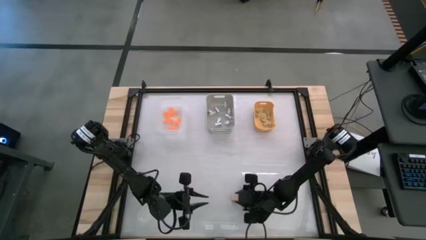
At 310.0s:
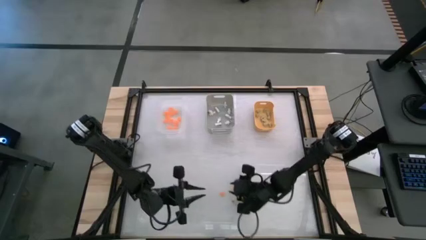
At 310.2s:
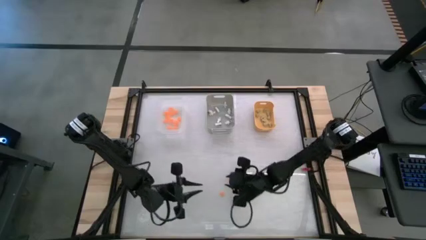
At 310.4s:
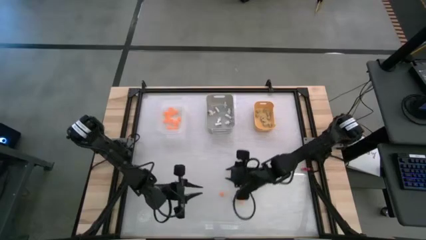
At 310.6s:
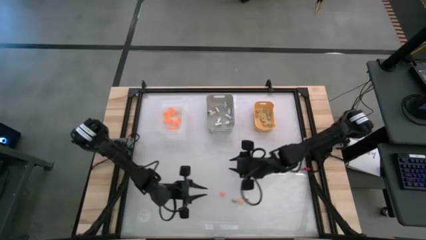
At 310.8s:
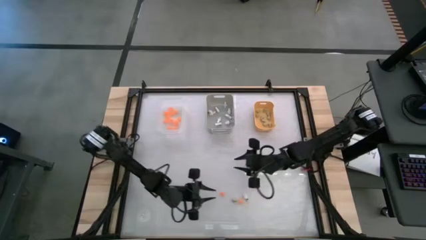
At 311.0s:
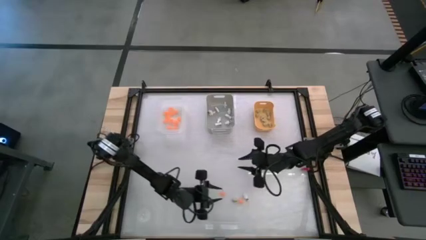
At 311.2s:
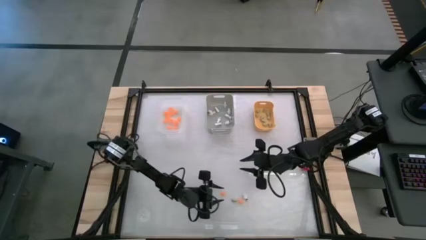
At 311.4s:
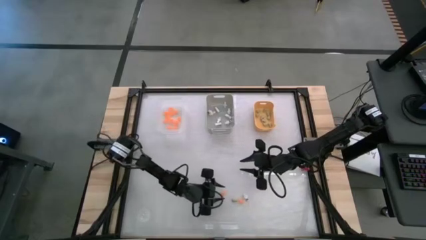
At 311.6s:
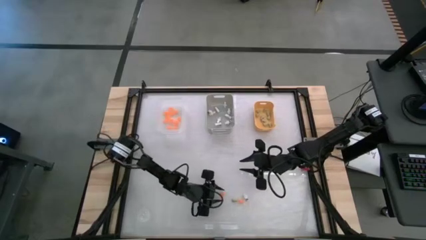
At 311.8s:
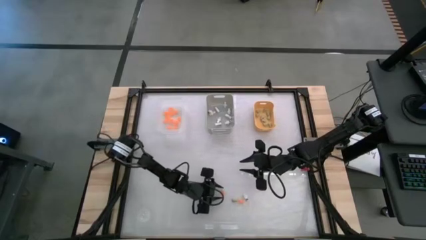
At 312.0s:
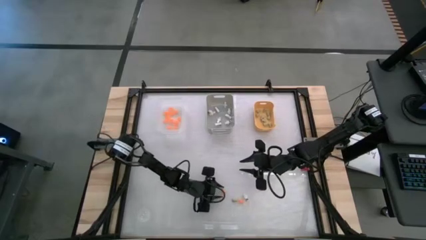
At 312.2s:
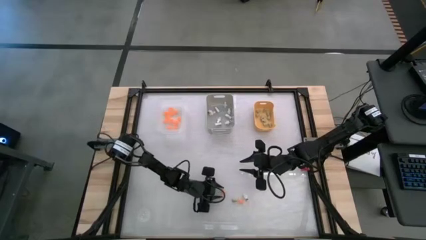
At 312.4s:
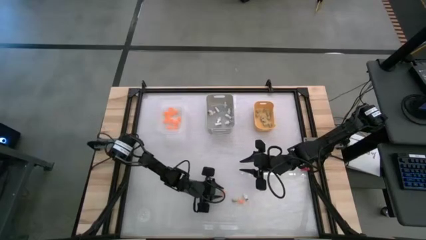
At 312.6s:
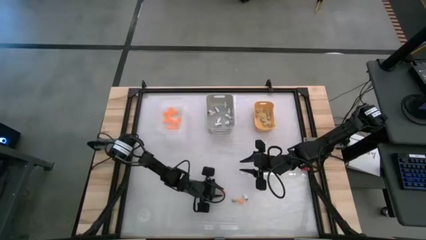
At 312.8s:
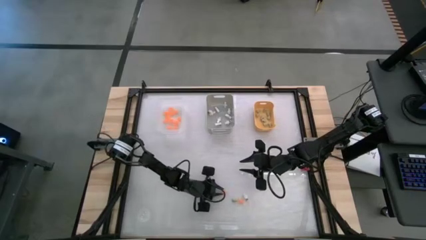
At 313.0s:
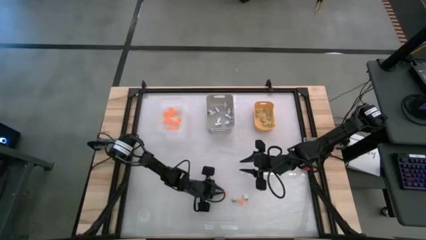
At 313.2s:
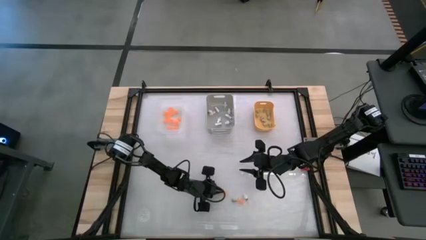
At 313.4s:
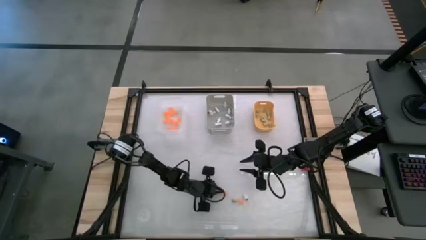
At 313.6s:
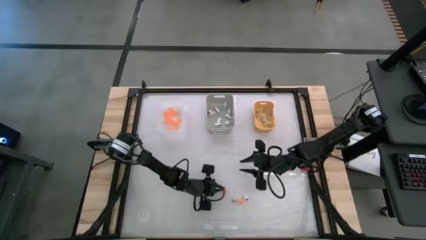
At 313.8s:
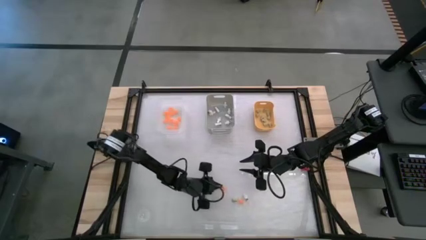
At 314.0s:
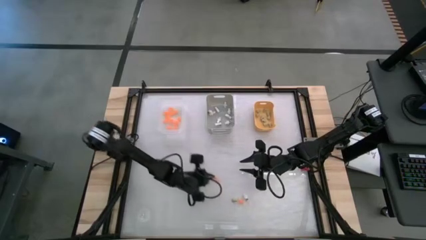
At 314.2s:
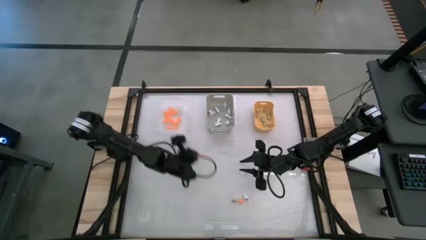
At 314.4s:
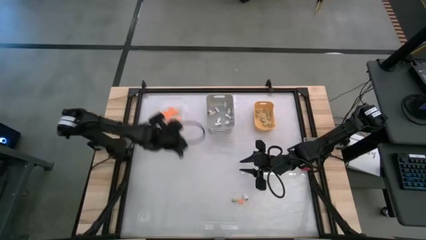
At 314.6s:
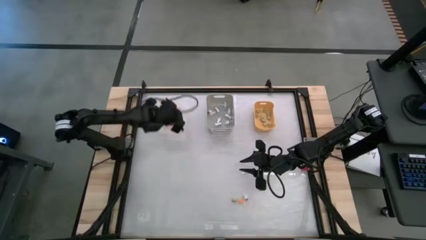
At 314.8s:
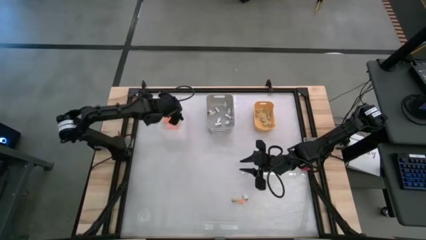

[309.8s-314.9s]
Task: Sort Halloween decoration
Put the orange spider toy into the transparent white bin

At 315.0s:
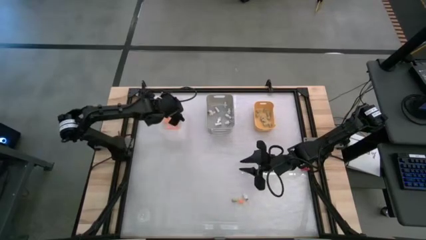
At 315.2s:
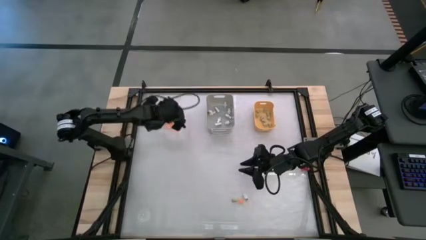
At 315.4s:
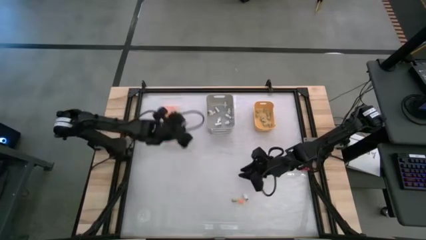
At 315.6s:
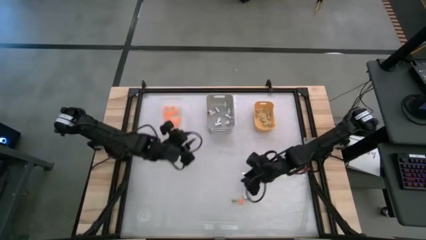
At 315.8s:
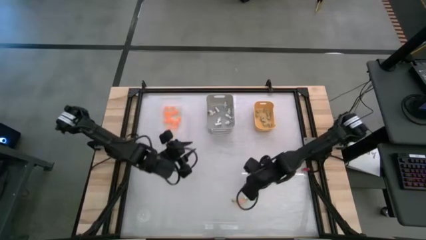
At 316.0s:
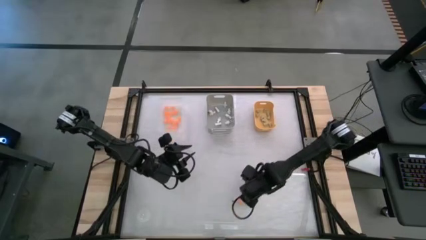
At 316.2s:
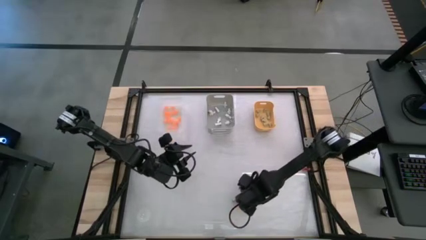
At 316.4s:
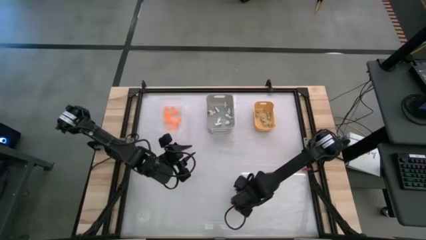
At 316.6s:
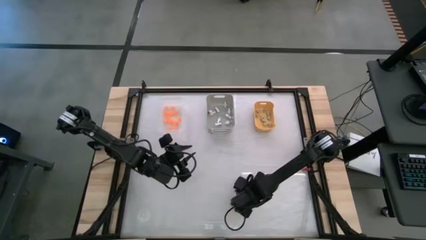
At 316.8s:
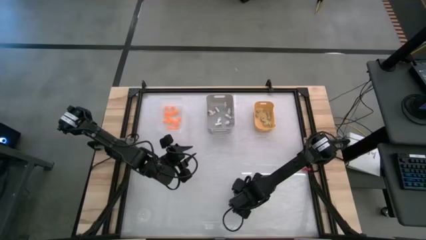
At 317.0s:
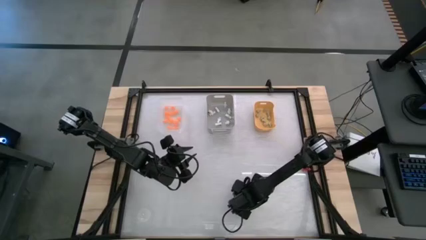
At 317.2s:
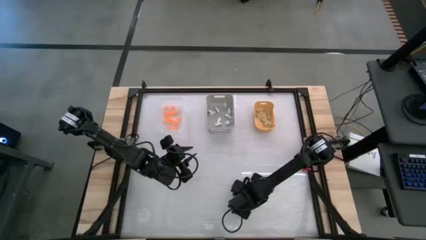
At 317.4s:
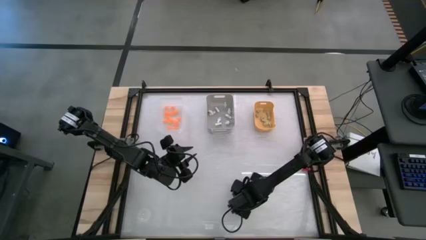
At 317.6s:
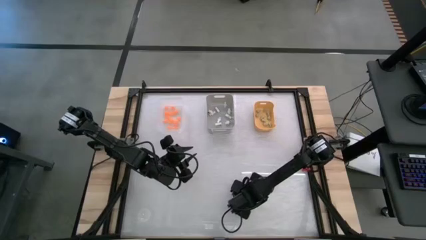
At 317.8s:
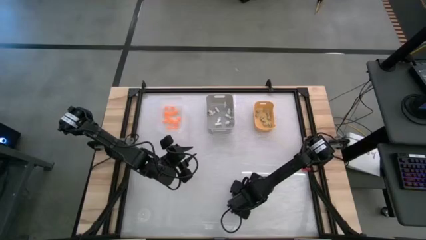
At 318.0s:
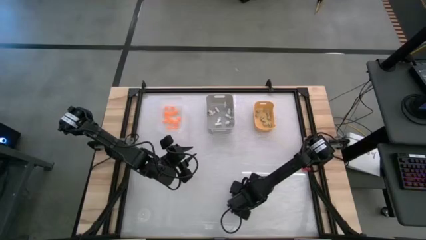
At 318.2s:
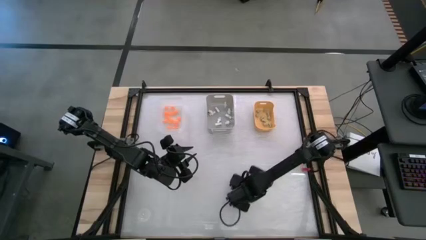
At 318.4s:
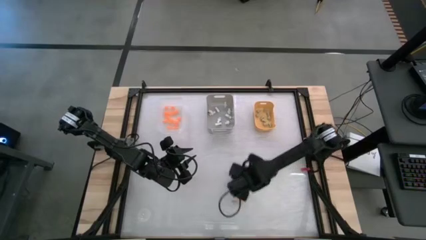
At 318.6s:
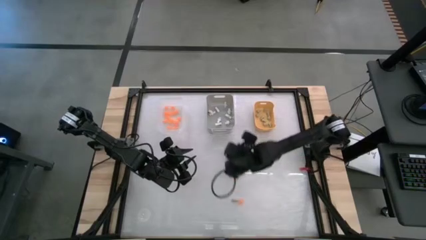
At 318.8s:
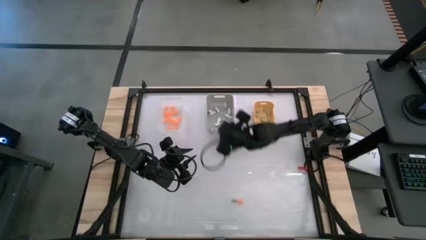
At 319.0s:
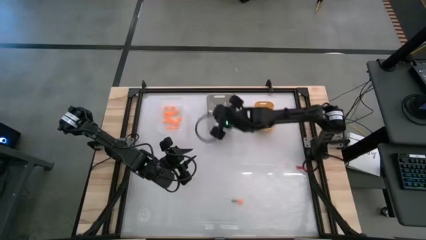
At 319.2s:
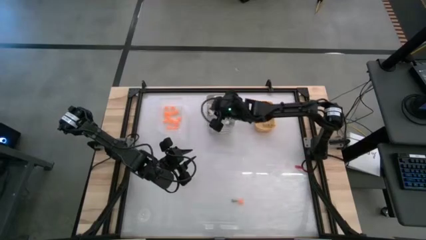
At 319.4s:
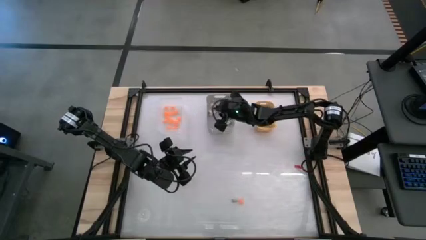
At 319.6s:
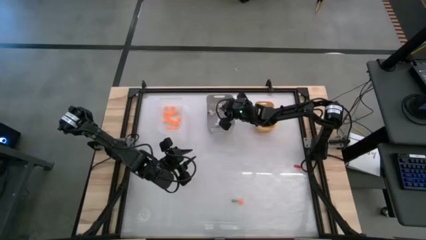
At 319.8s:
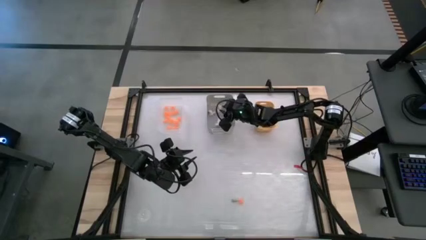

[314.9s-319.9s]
Put the white skeleton toy into the gray bin

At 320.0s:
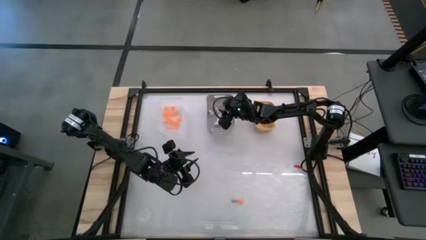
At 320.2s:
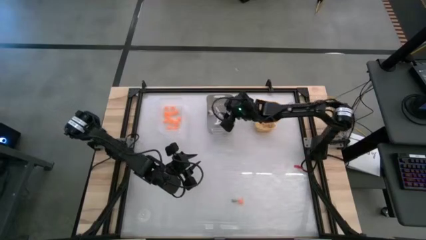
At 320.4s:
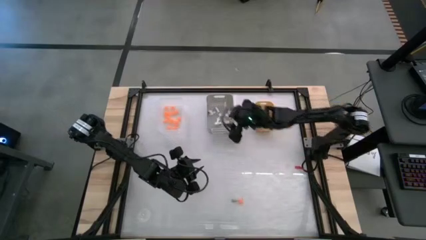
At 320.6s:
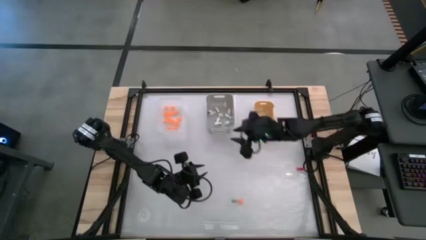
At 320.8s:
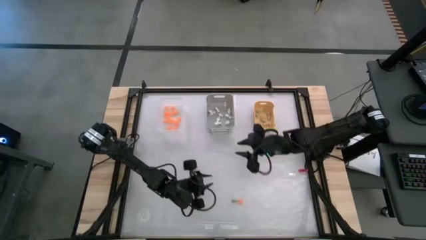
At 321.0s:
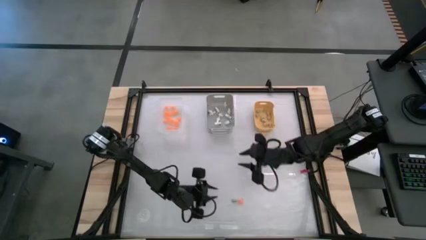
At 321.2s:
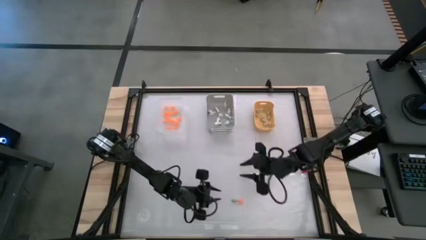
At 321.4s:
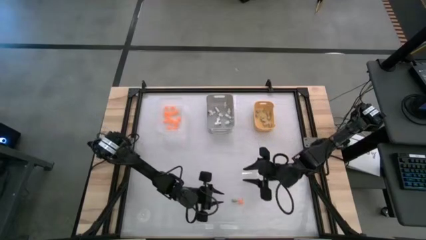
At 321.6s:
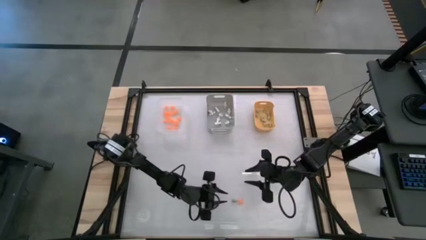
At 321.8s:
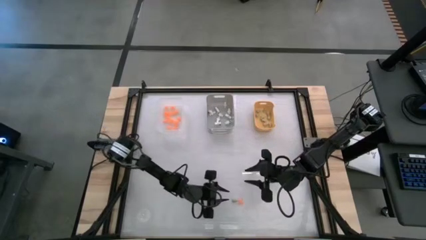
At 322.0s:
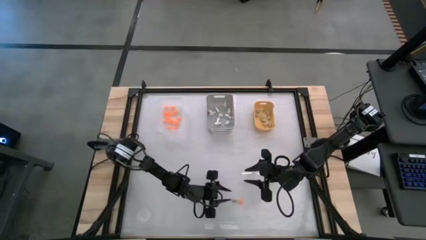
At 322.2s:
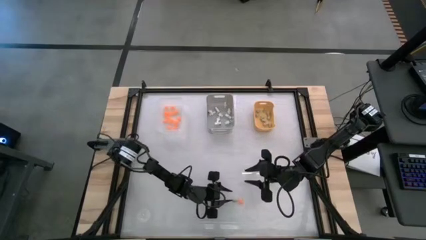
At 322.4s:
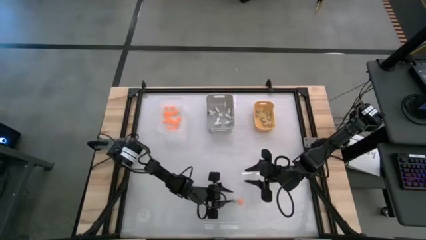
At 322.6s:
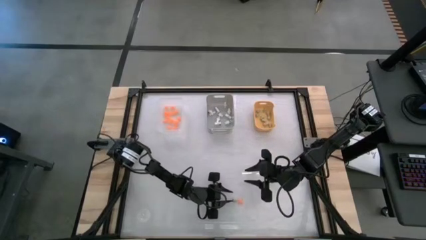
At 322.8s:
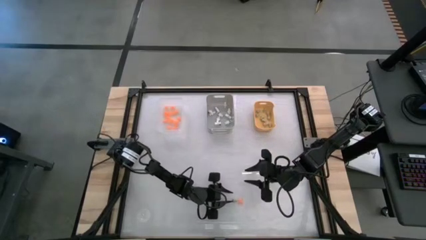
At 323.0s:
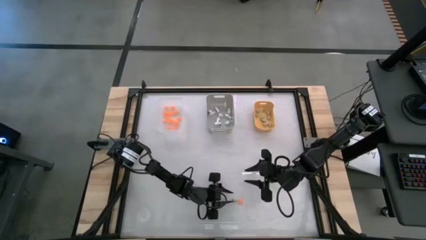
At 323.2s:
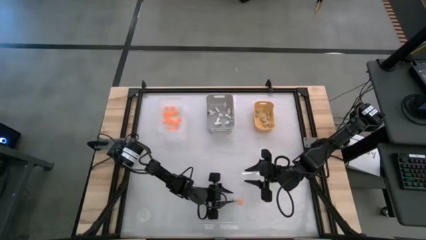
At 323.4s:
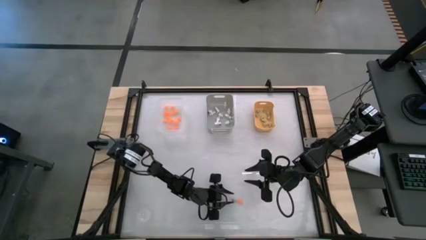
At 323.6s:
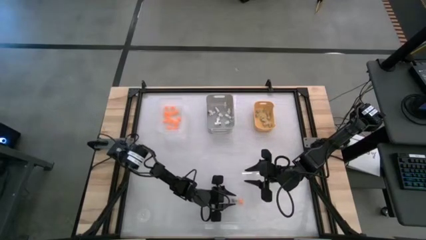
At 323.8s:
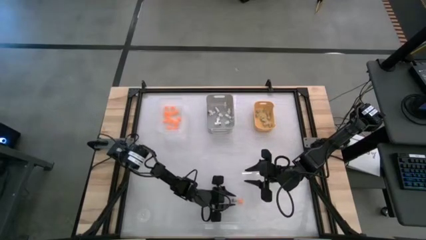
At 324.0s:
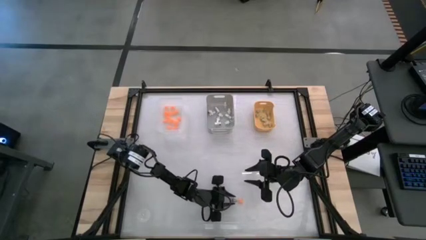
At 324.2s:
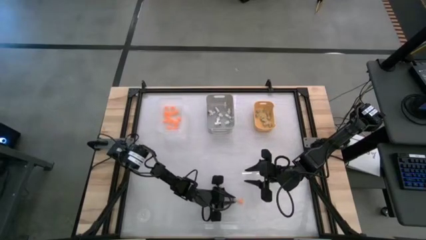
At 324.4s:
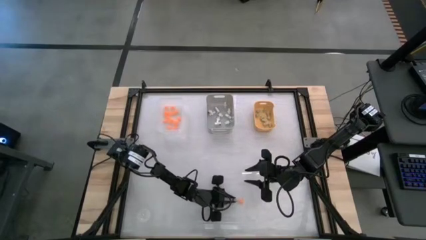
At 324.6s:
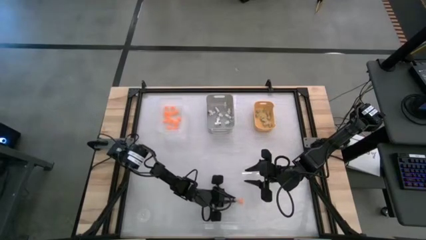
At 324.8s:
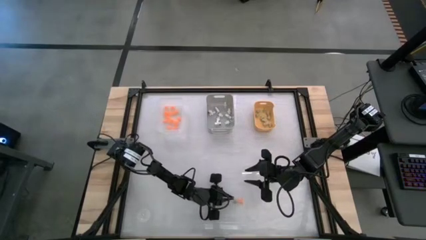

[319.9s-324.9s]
Put the cream white skull toy into the yellow bin

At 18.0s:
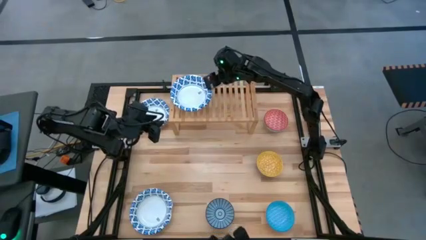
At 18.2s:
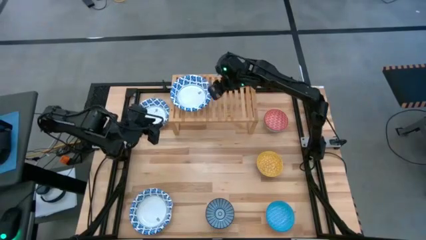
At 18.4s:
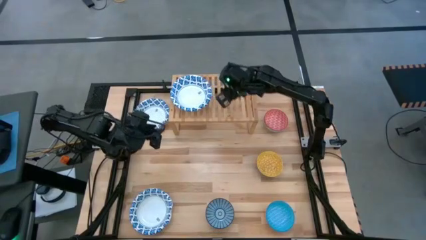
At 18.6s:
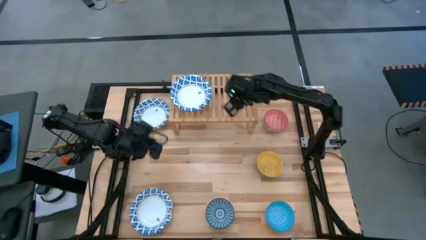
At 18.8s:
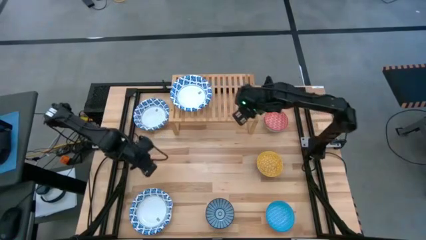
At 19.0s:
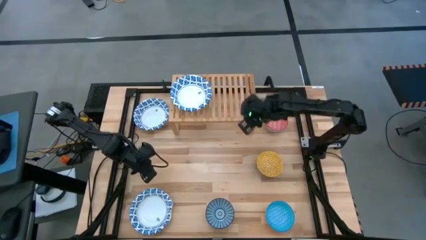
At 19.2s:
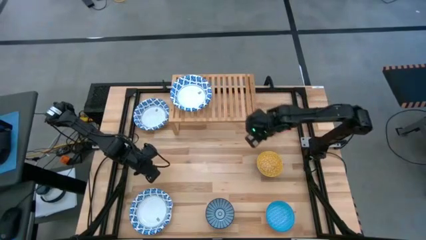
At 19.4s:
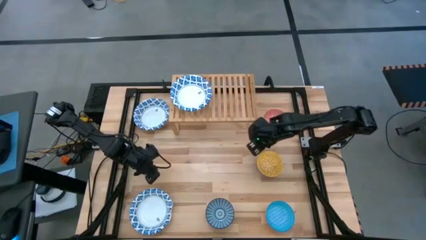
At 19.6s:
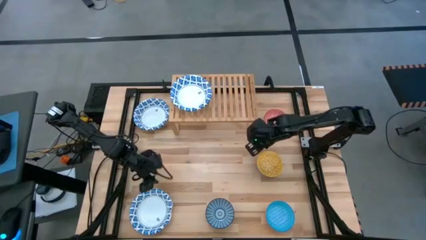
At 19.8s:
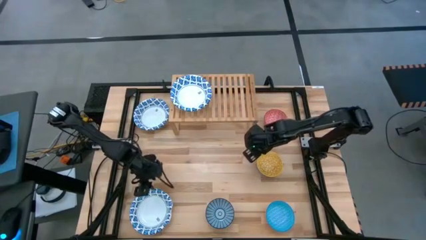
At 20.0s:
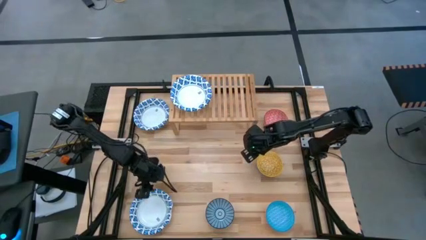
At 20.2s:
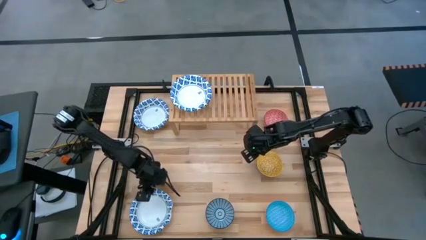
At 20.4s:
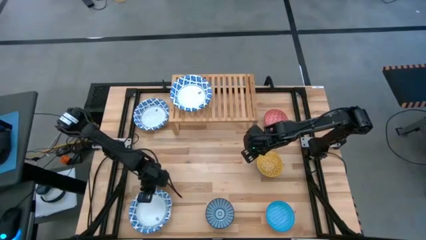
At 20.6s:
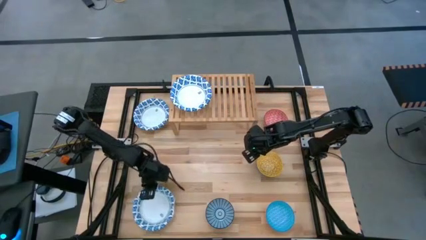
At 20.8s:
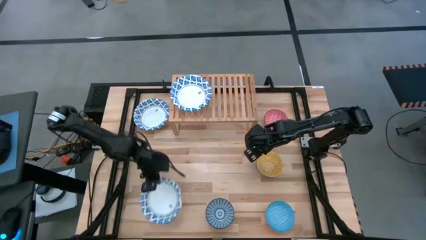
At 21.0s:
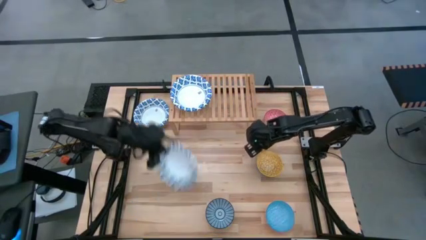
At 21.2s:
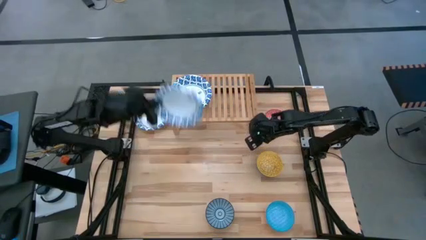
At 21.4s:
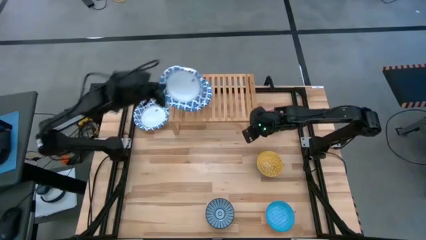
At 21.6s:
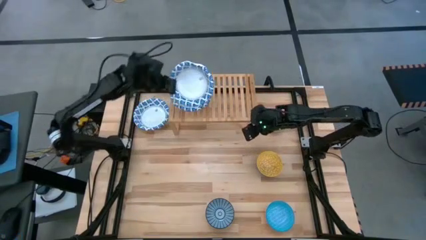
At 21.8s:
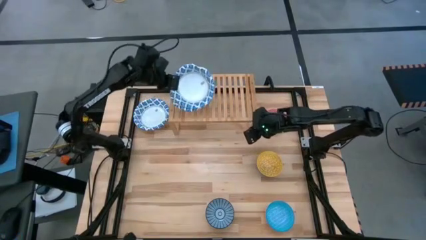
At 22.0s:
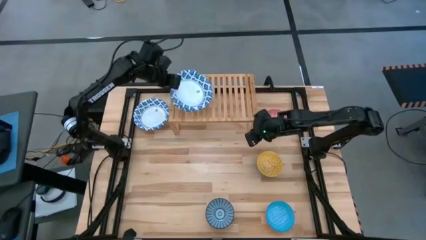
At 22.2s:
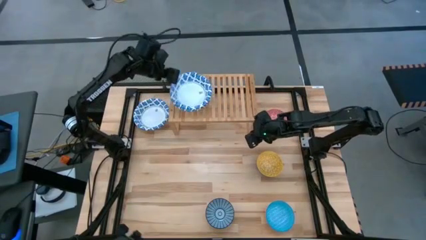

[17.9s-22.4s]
Task: Place and stack bowls onto a shelf
Stack the big white bowl on top of the big white bowl
